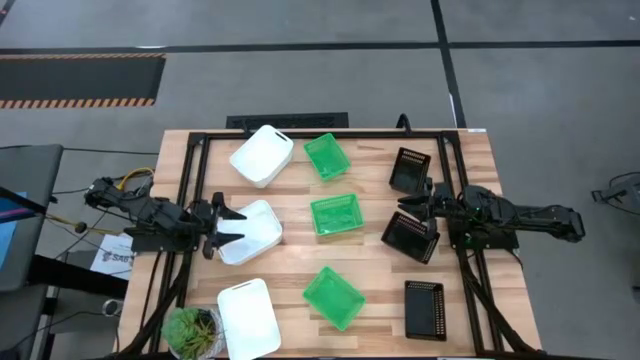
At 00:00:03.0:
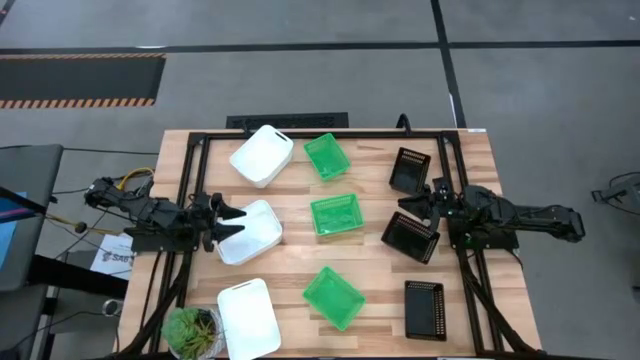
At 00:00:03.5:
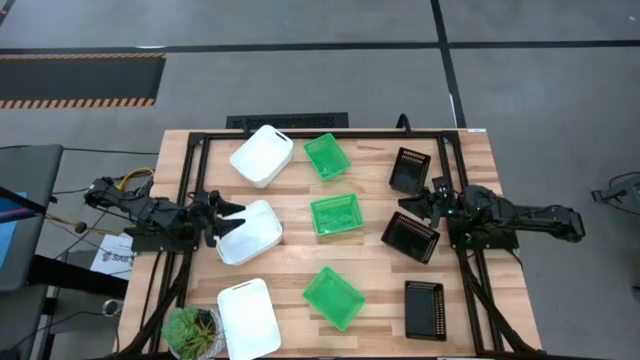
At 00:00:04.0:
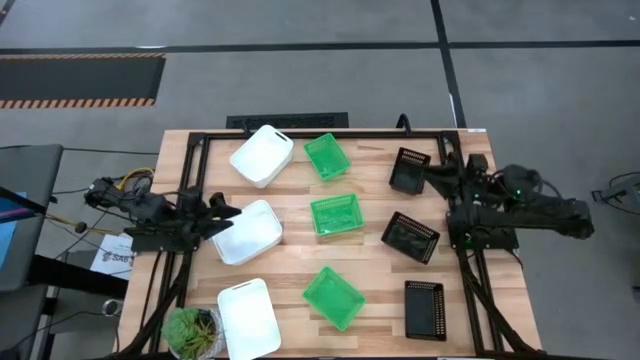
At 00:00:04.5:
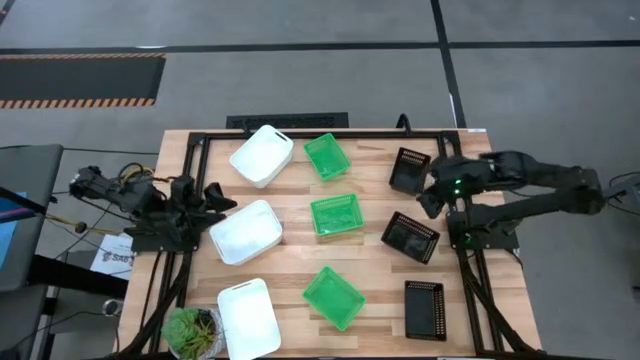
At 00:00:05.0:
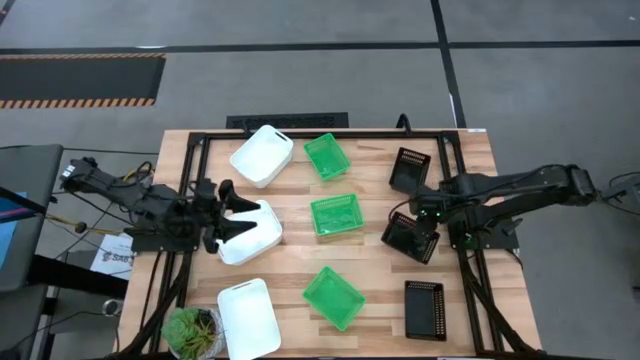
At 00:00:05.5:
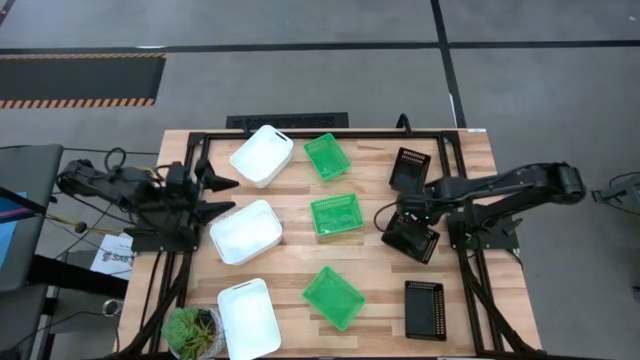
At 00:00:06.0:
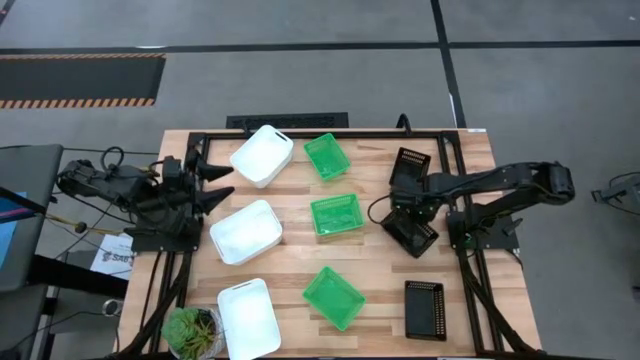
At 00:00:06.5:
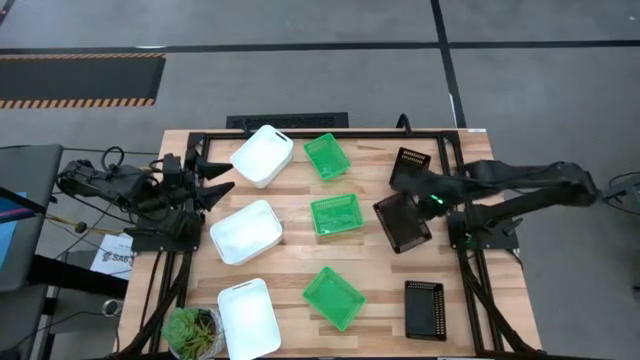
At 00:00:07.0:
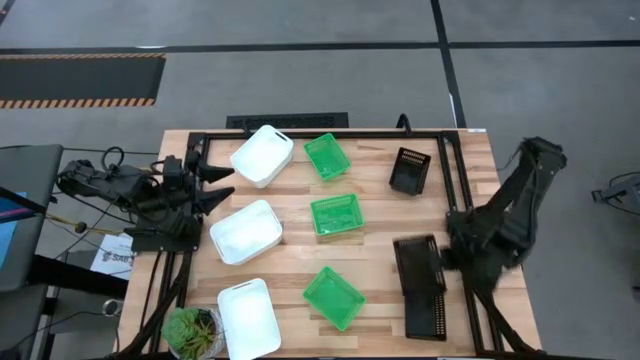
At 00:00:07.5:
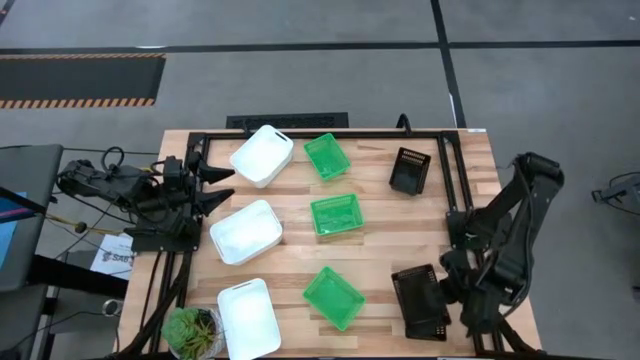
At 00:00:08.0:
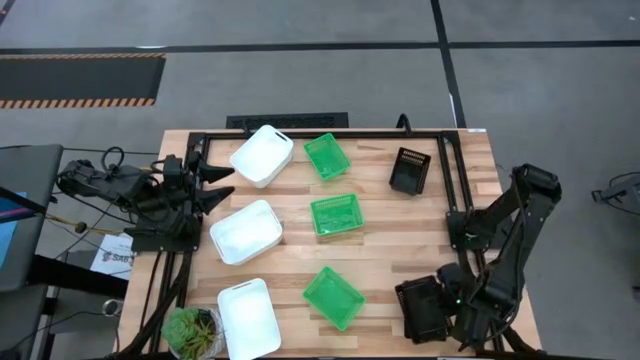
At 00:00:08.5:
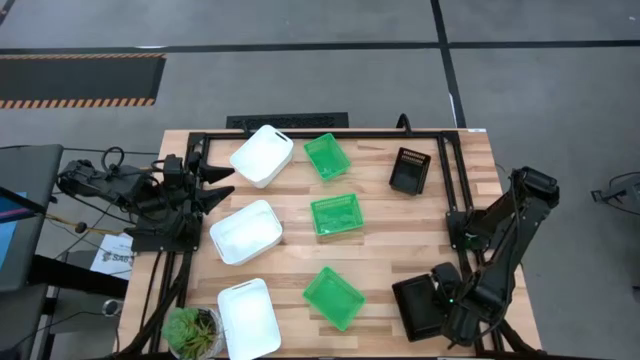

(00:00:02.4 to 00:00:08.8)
Stack the middle black bin on the bottom black bin

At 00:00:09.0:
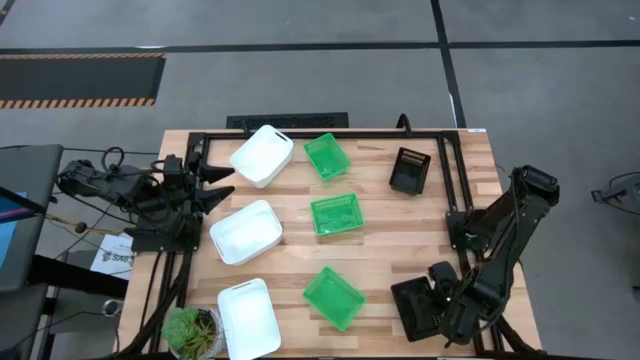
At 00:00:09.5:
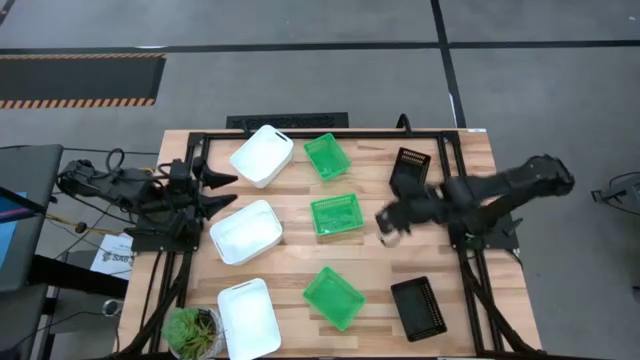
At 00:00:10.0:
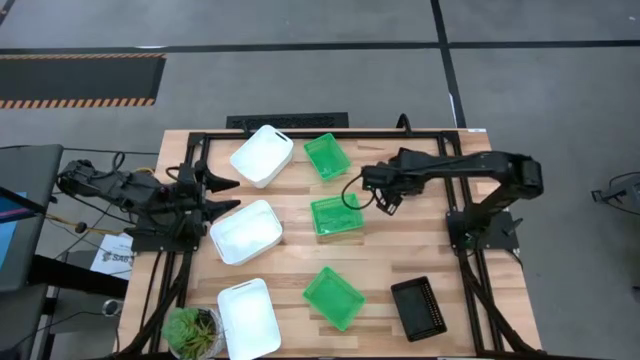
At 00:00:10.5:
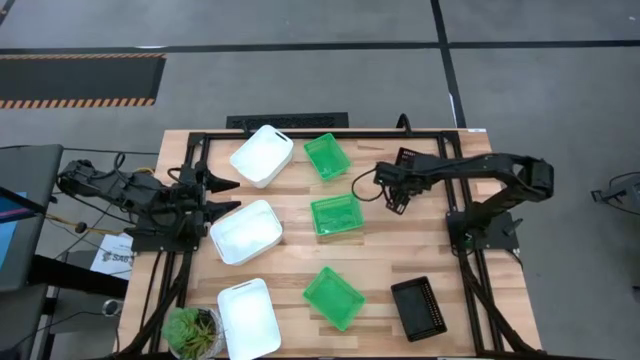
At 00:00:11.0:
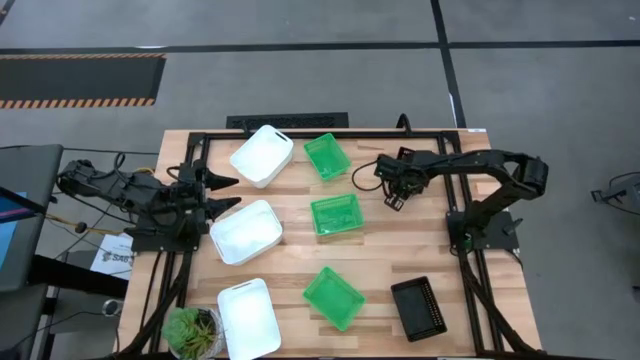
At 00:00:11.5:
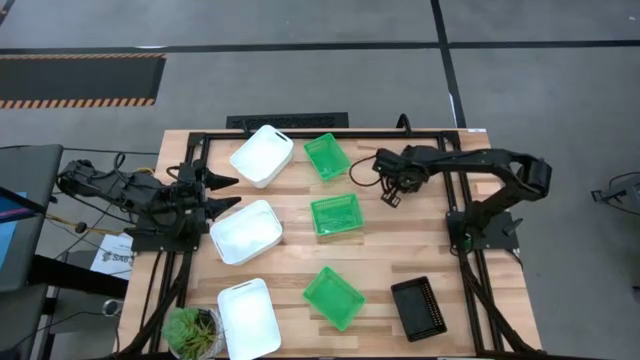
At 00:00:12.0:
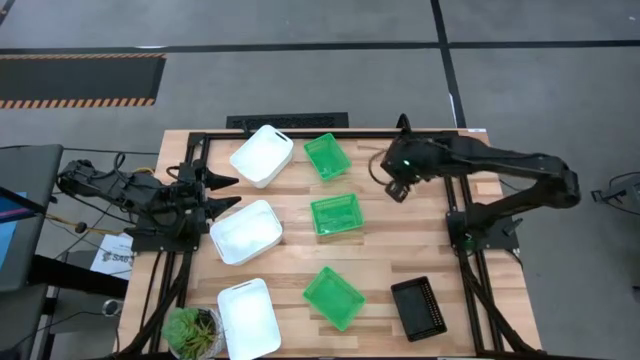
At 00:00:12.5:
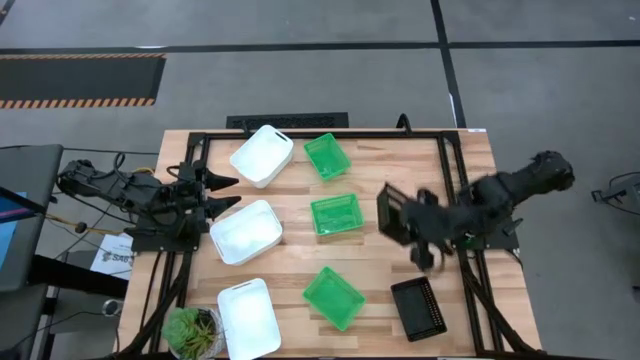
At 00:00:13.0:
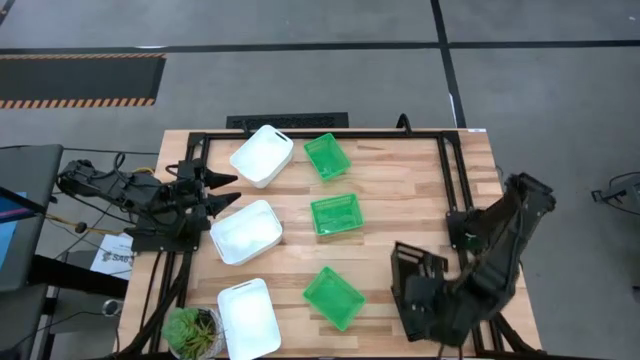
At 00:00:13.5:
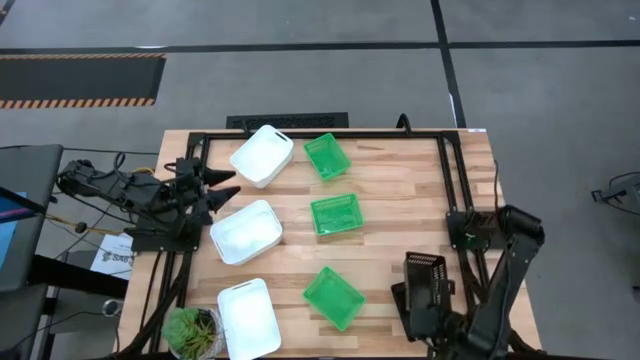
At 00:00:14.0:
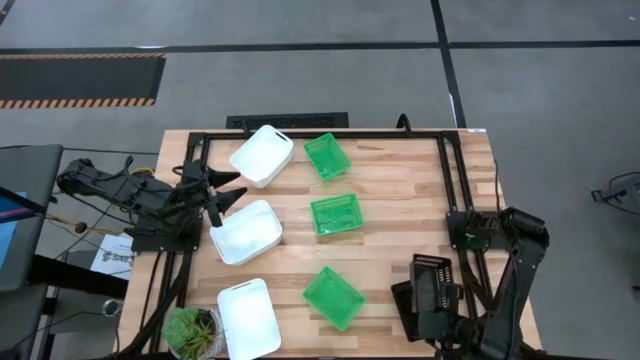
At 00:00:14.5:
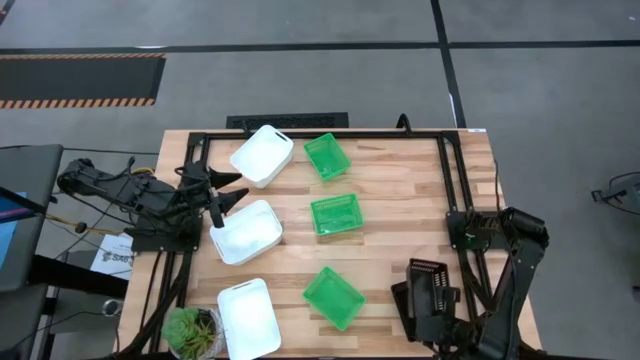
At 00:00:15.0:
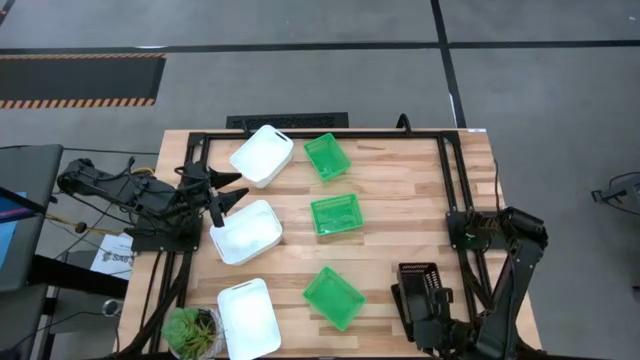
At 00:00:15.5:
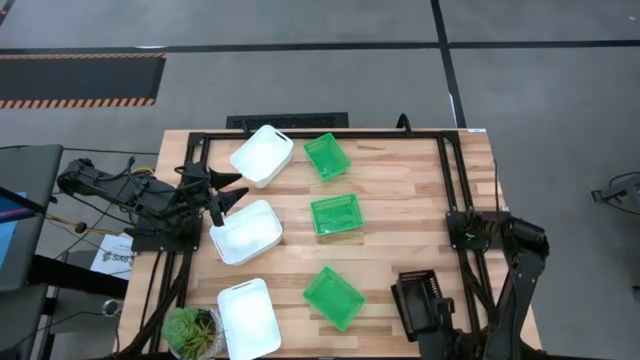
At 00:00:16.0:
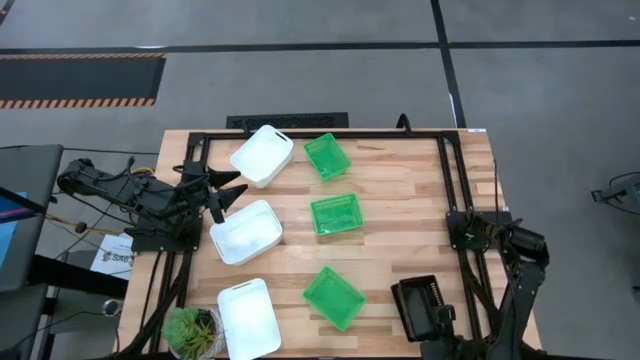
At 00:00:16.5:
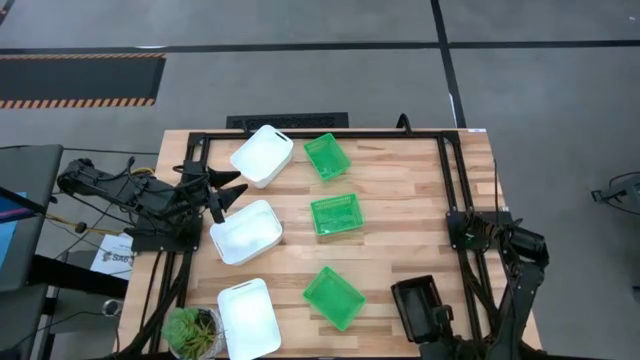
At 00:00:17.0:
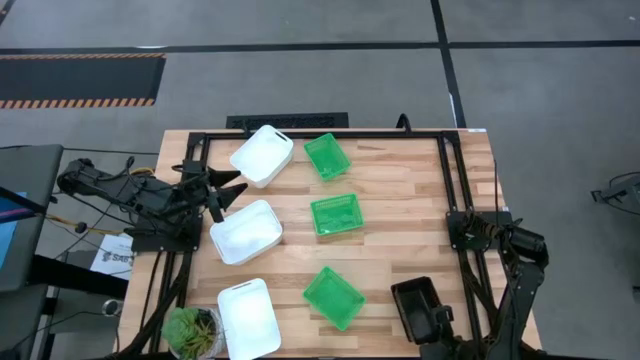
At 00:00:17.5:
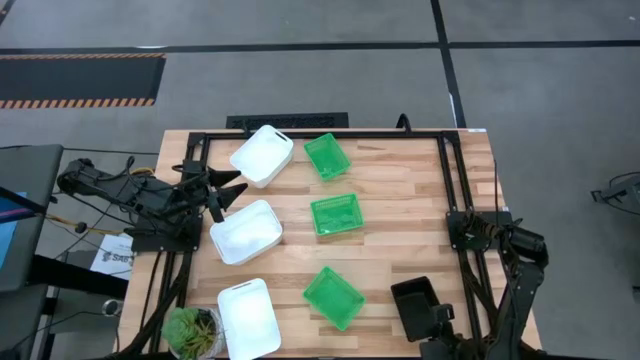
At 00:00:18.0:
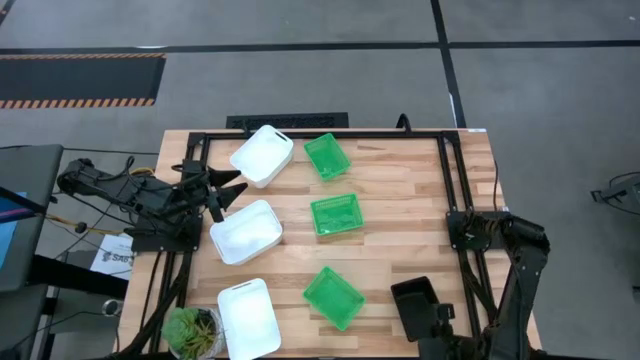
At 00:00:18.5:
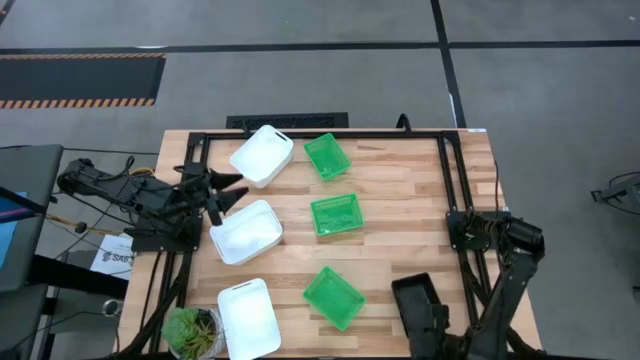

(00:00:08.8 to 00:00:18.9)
Stack the top black bin on the bottom black bin
